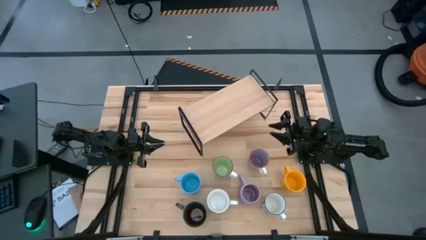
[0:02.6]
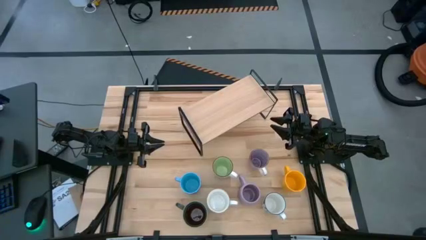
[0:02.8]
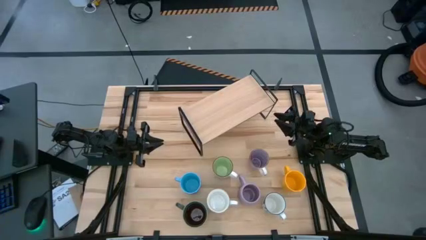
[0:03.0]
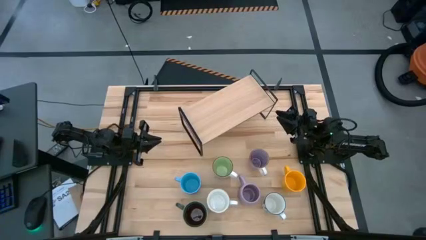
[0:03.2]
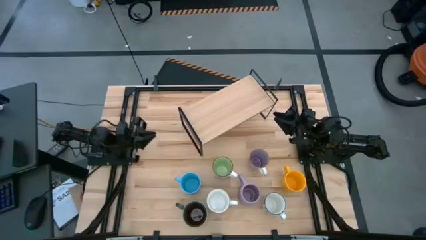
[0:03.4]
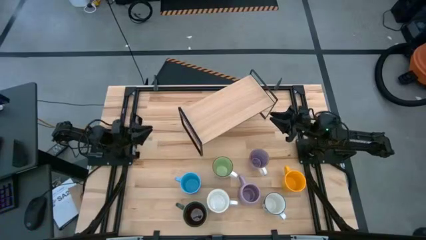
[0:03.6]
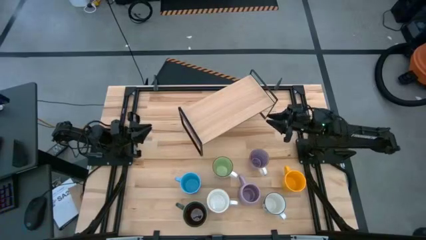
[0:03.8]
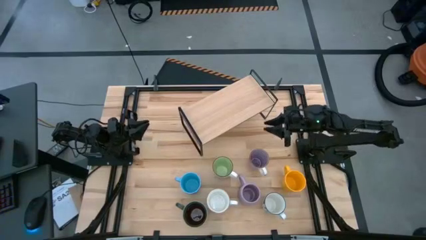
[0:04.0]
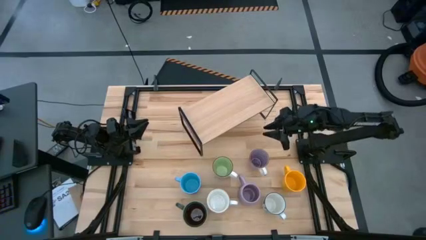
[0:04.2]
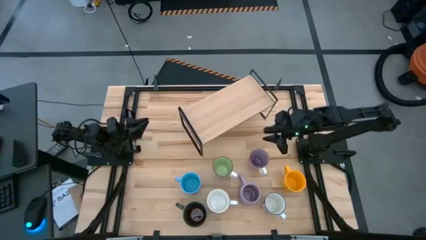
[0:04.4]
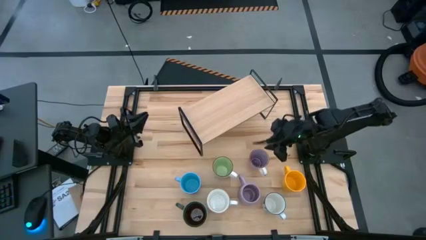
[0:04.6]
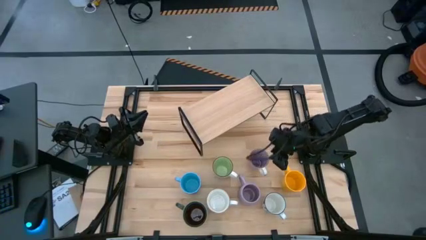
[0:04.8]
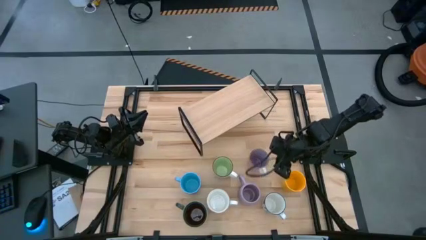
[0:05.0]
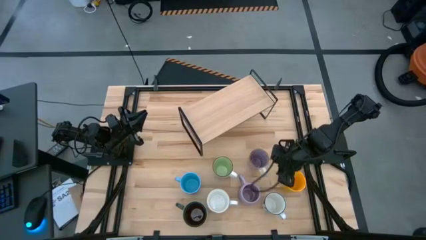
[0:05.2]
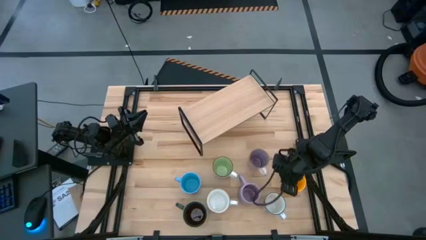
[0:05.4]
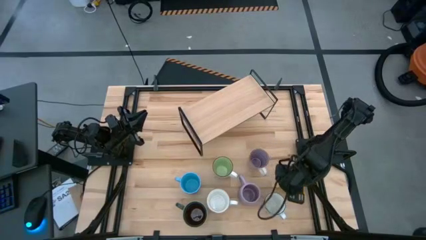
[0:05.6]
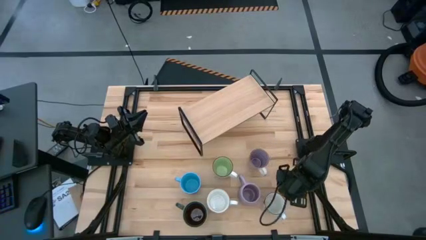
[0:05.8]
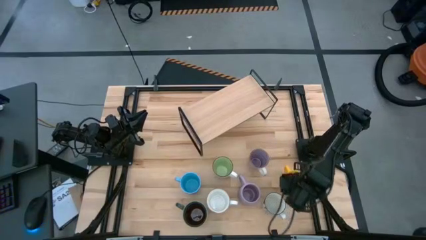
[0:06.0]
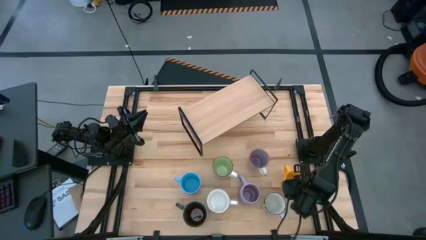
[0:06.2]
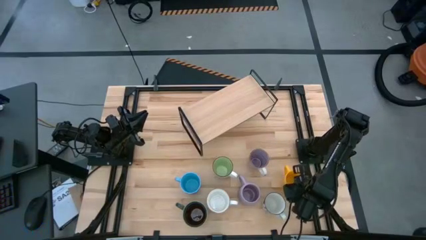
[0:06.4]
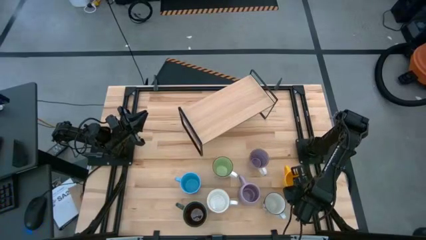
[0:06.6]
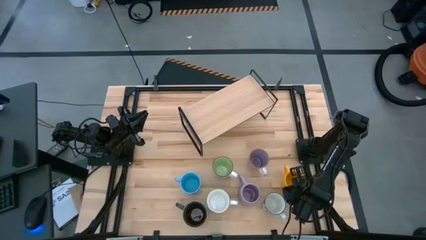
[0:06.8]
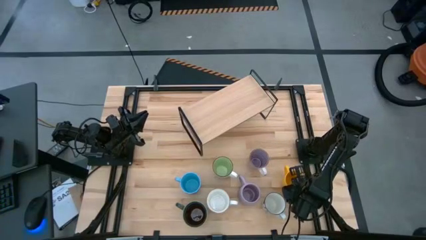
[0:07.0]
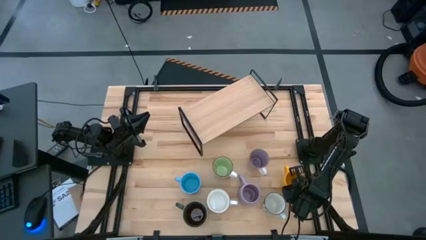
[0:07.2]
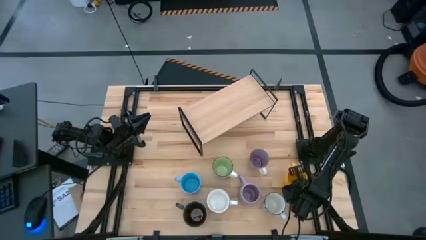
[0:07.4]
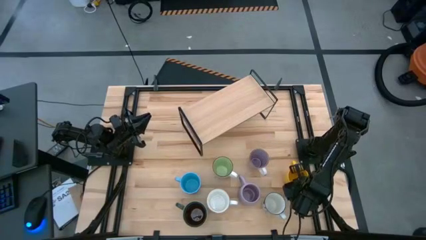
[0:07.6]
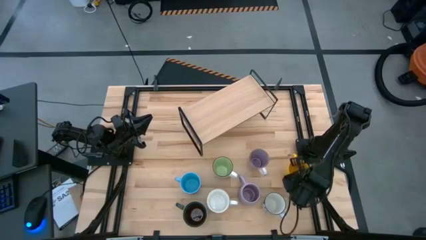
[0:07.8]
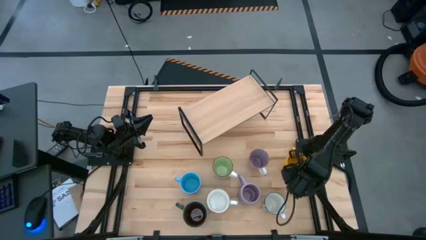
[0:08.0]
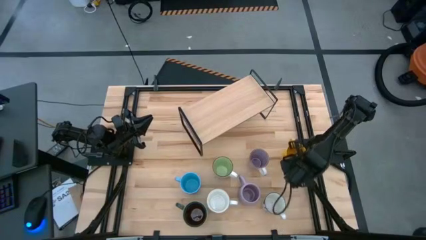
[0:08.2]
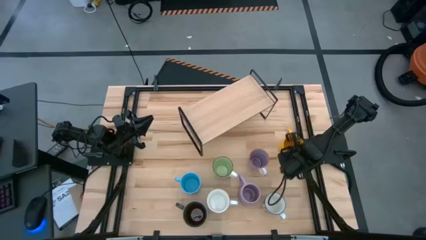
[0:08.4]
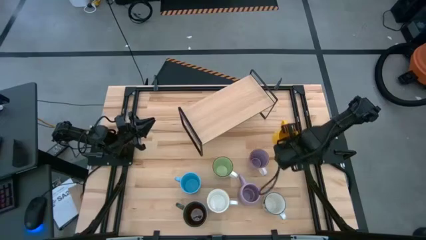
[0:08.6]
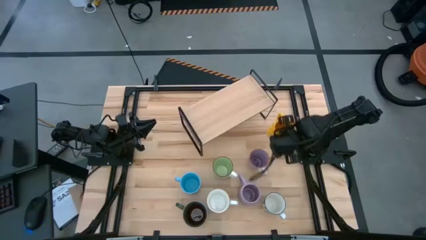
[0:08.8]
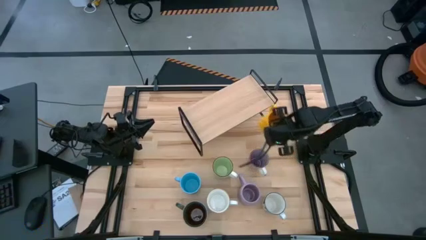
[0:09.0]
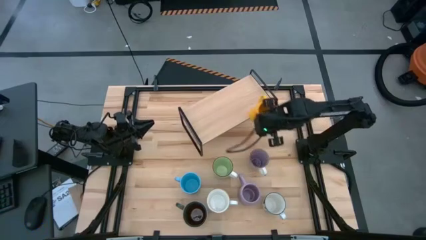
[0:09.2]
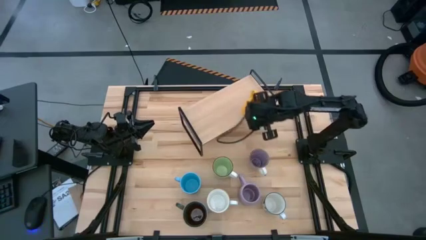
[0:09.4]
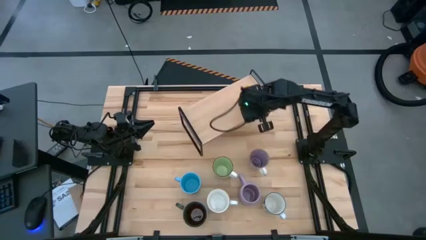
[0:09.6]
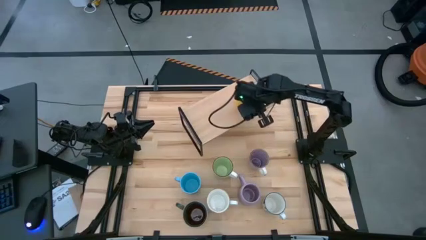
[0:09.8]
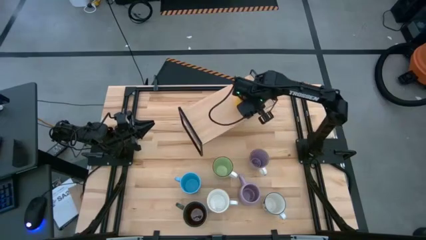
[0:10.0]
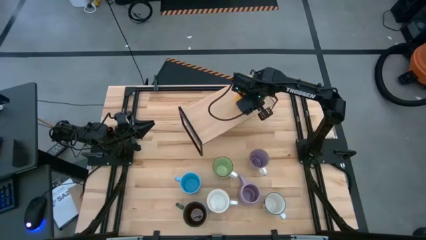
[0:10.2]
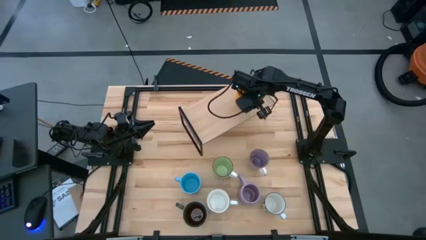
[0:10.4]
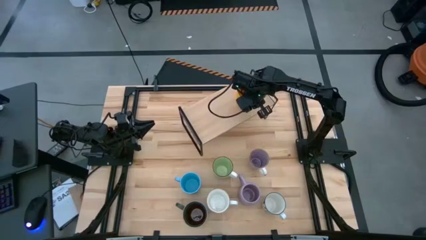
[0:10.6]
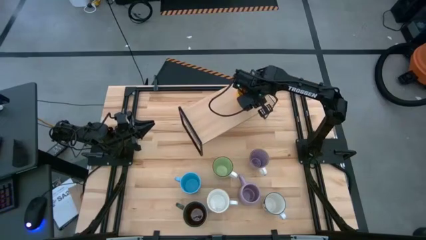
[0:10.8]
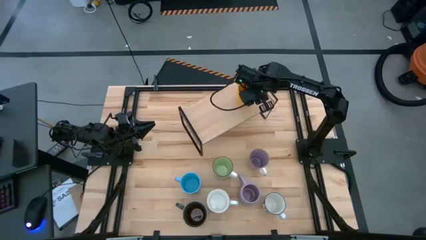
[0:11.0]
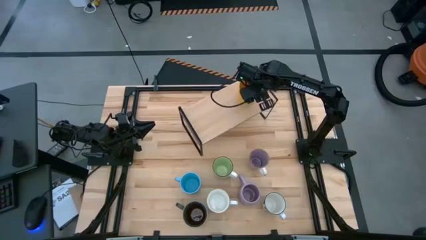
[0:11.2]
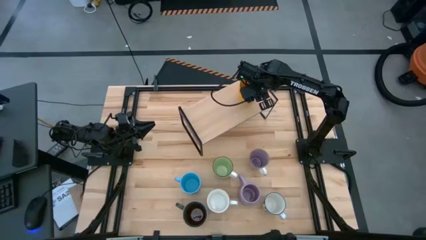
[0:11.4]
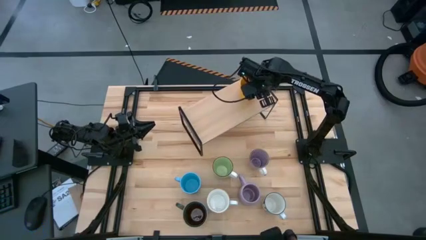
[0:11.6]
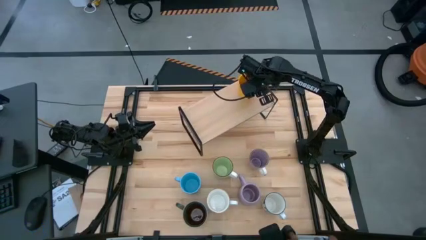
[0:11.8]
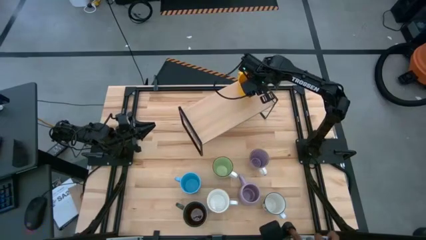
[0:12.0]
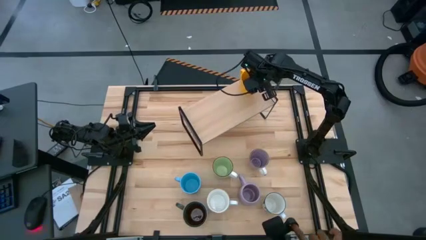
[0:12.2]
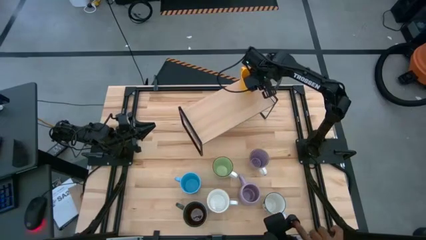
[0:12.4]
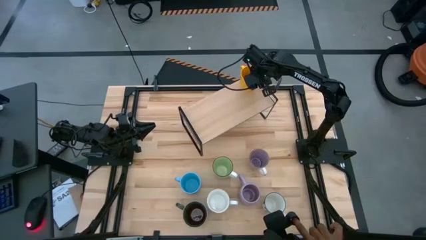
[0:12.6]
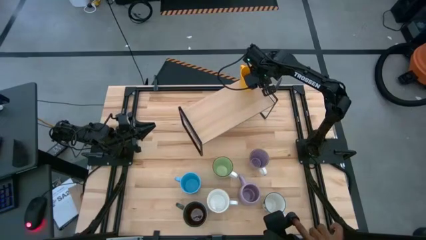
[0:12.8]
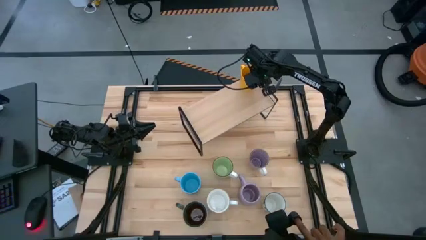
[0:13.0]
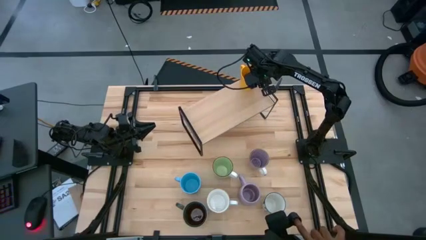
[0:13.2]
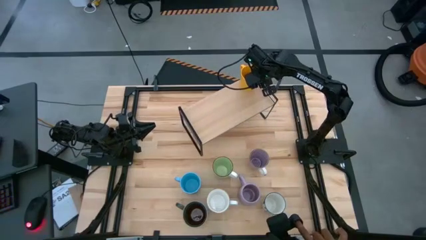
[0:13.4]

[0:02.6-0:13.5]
Task: Place coffee mugs
Put the yellow mug on the shelf

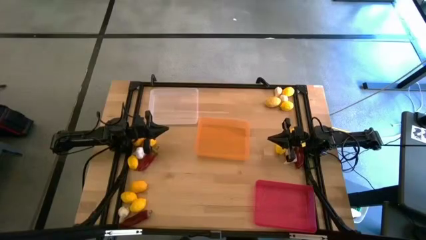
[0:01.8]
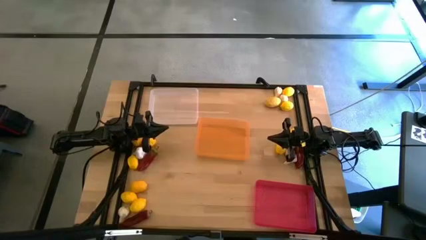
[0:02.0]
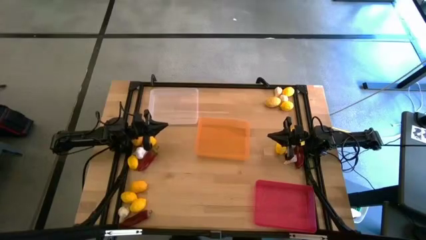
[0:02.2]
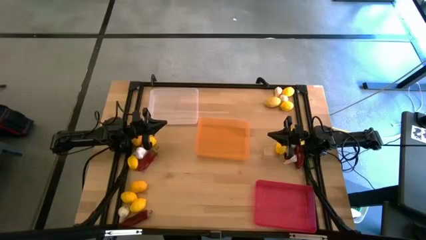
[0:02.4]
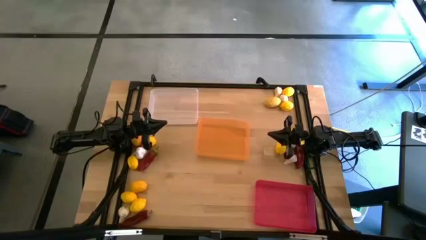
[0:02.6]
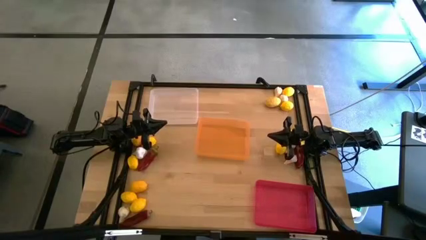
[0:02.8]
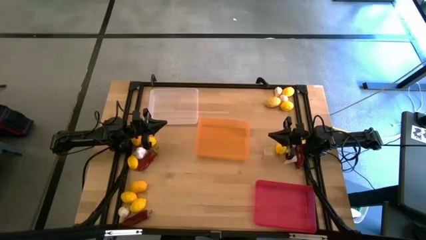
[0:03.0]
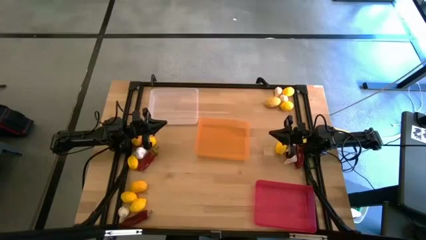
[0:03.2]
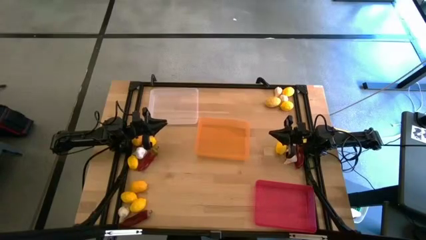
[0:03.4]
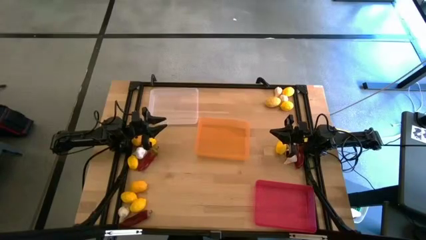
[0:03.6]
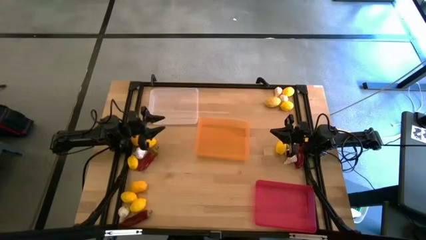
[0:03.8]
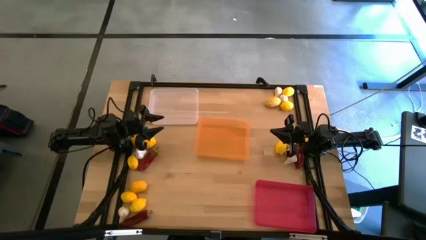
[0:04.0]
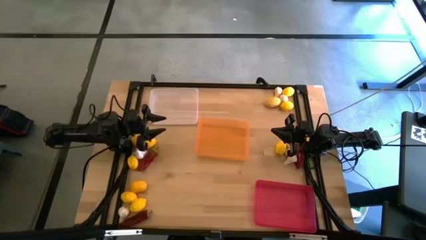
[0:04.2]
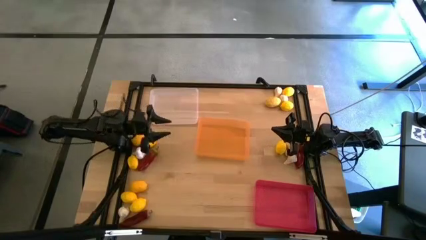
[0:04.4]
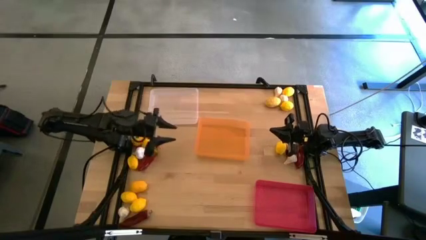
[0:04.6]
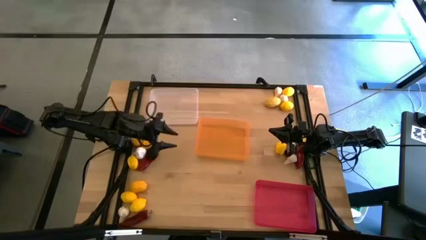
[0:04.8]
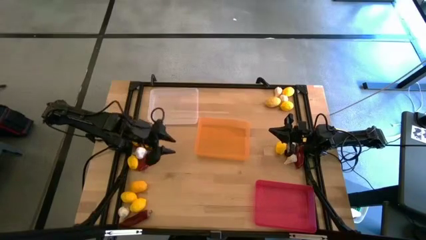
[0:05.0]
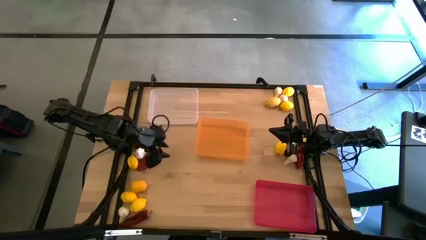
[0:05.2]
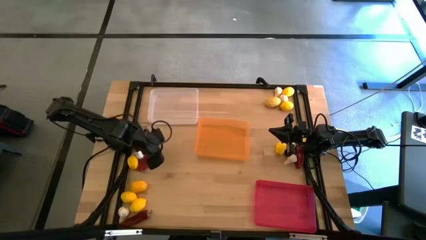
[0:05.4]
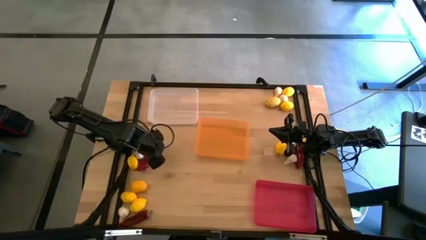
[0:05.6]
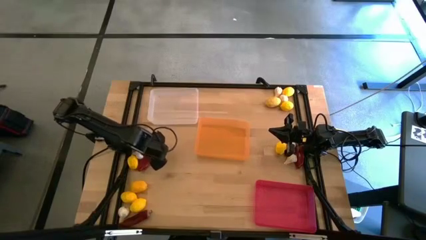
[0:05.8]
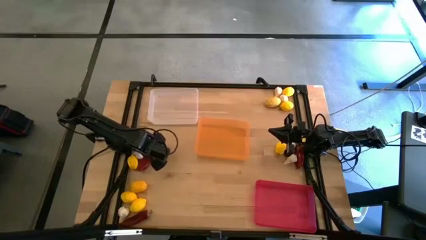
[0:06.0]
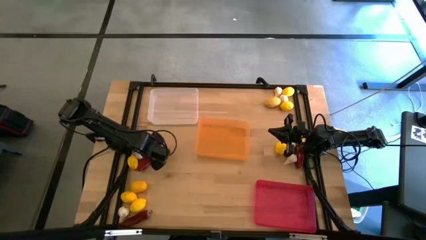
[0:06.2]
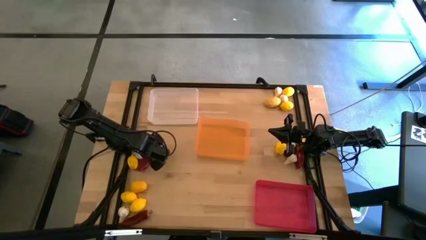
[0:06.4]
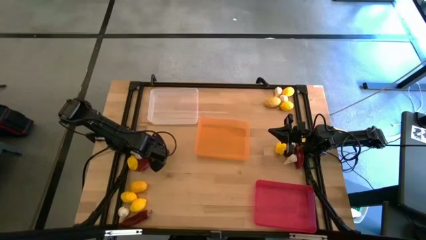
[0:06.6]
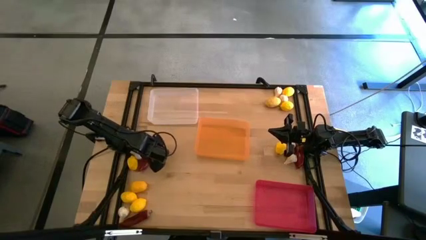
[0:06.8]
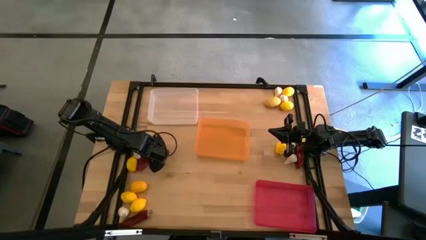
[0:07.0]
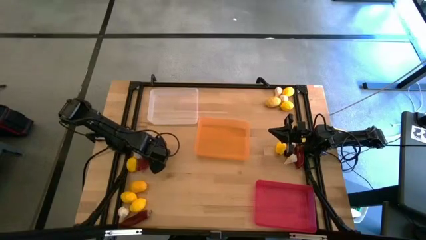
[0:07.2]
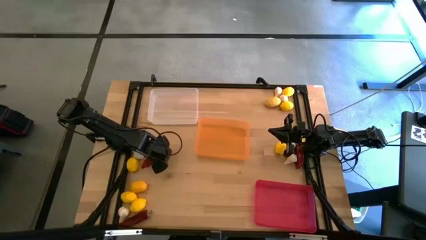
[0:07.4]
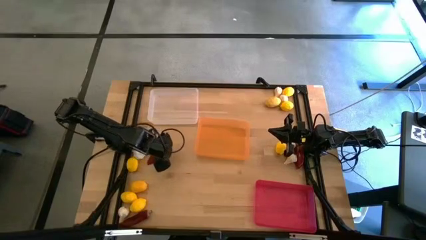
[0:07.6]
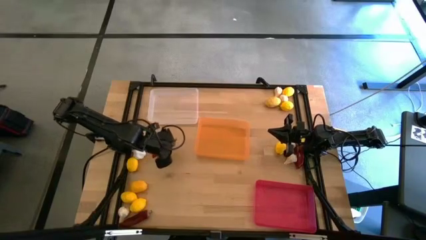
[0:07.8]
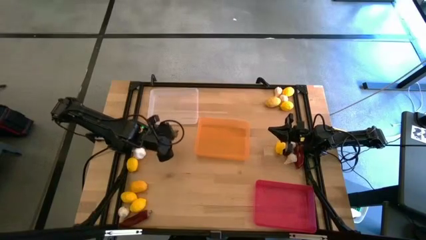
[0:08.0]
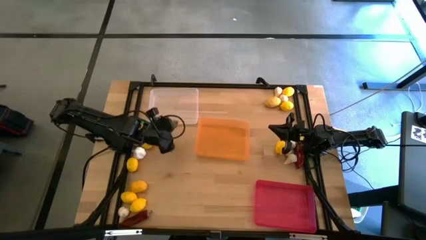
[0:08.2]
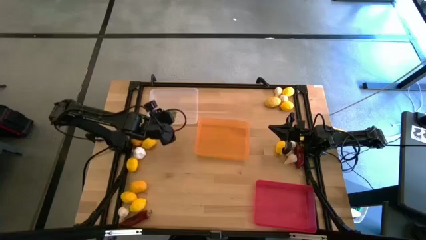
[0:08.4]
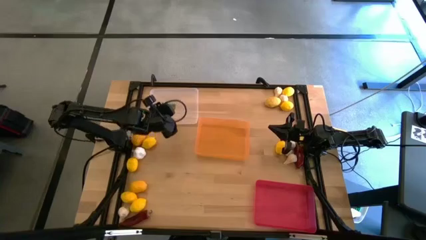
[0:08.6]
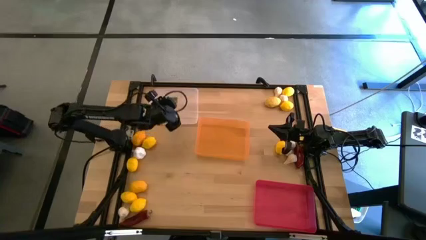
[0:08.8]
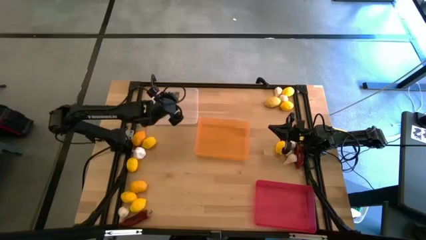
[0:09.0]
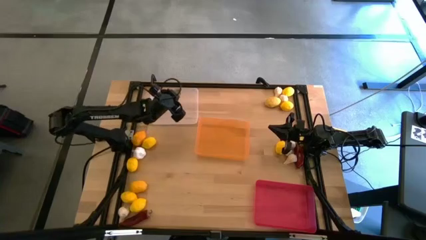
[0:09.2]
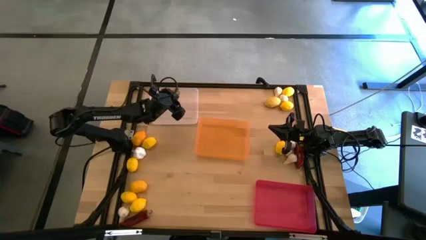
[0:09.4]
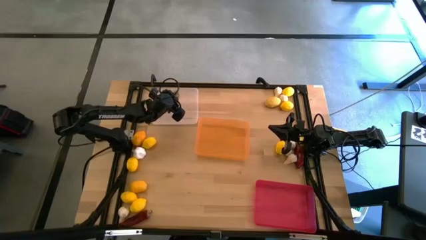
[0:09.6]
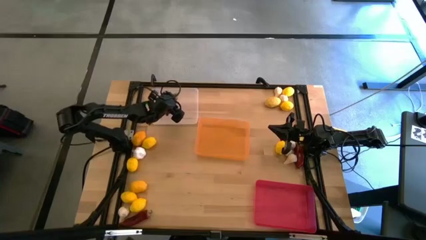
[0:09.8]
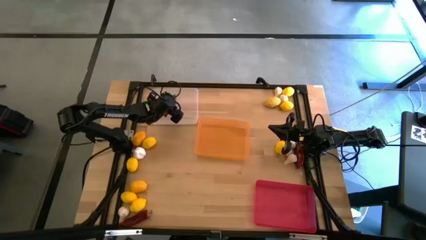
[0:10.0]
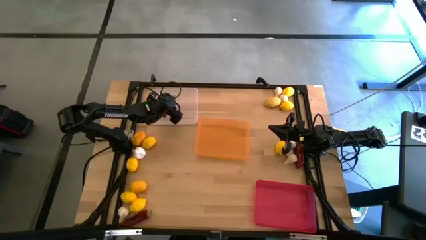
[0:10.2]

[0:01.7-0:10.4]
Task: Sort produce into baskets
Put the red chili pepper into the white bin
